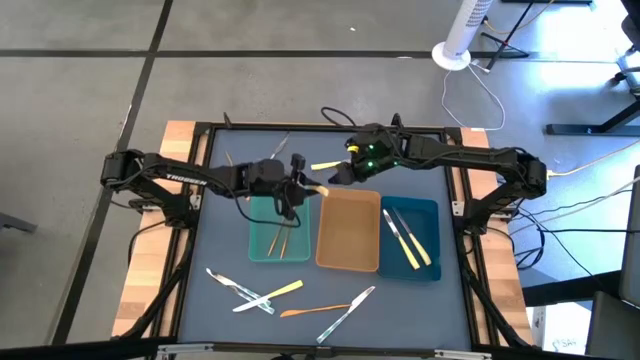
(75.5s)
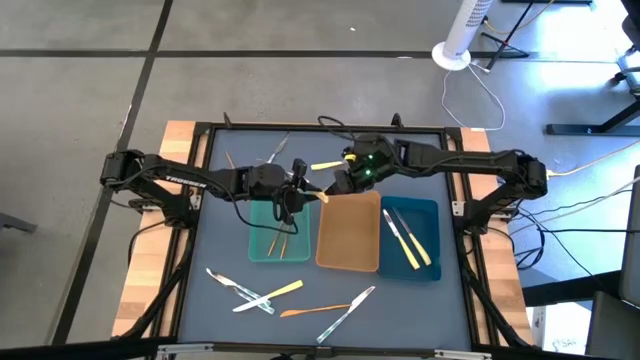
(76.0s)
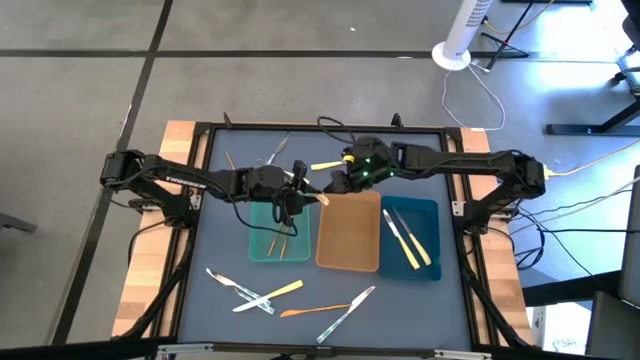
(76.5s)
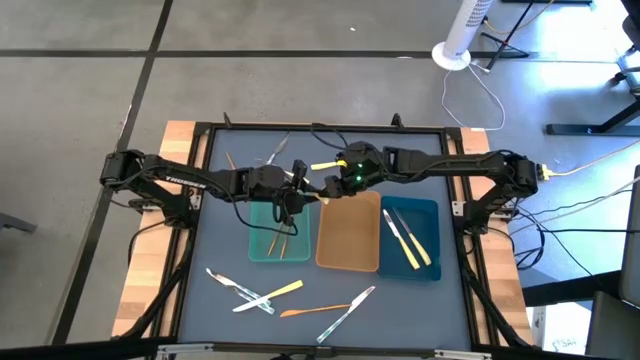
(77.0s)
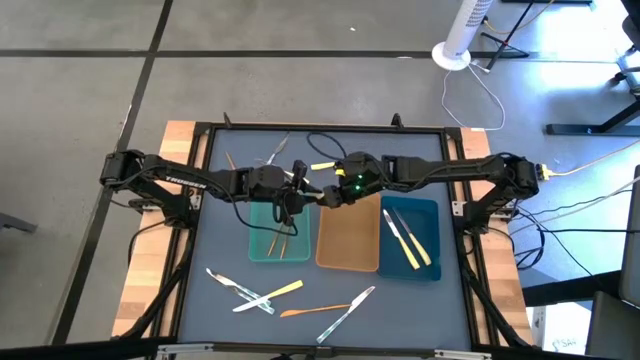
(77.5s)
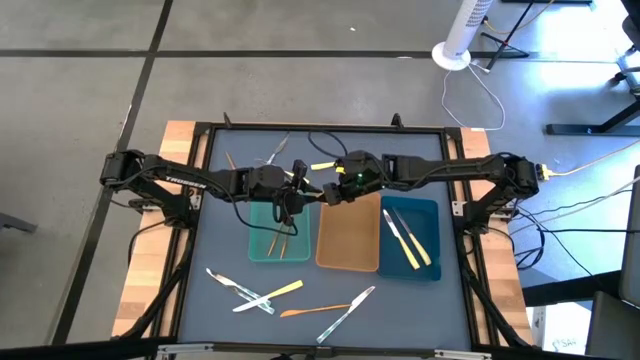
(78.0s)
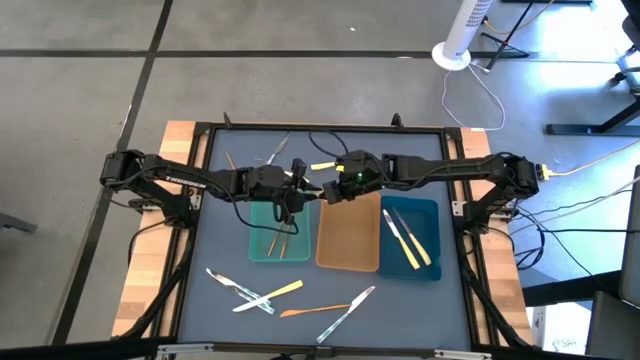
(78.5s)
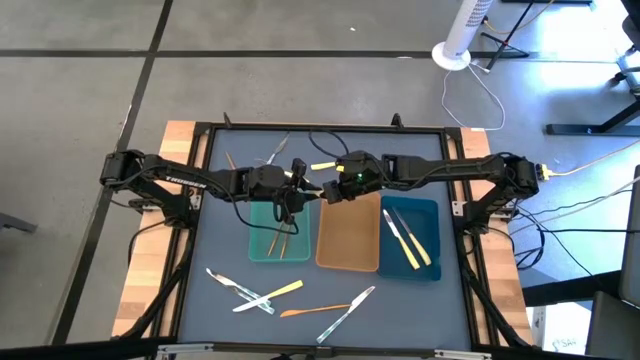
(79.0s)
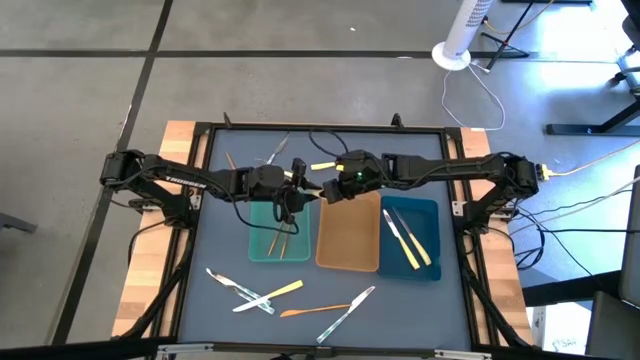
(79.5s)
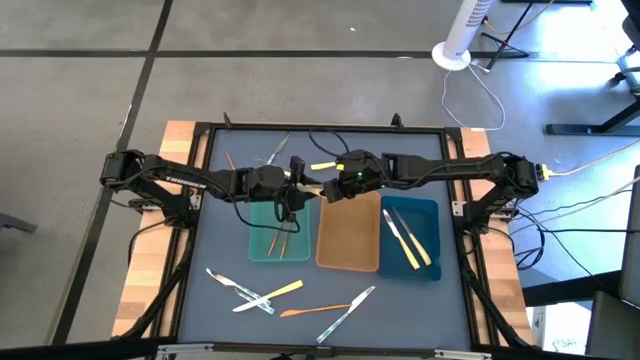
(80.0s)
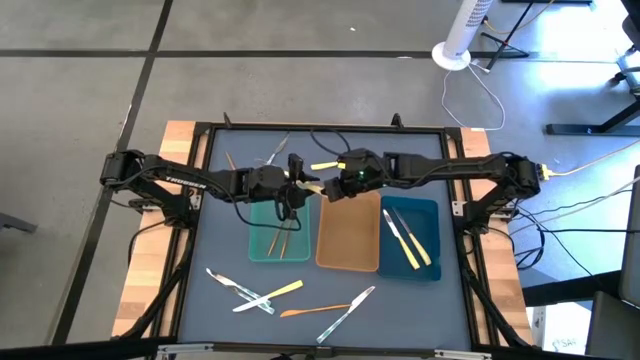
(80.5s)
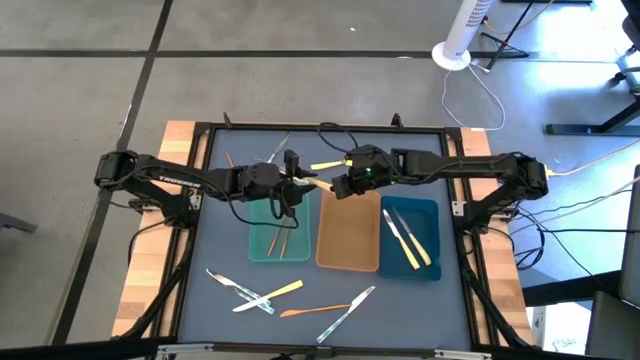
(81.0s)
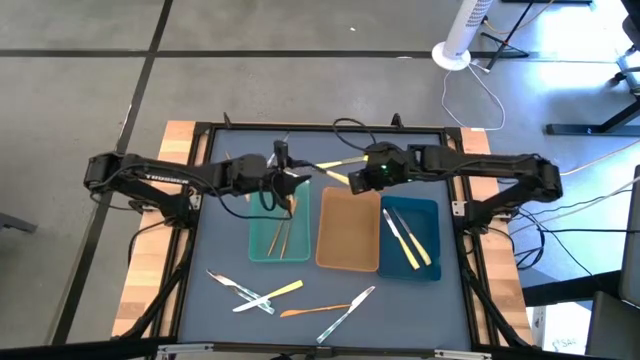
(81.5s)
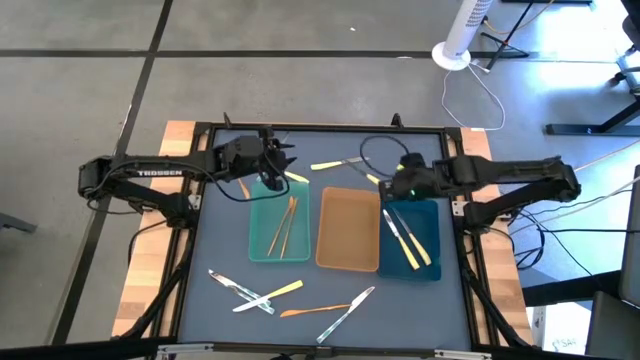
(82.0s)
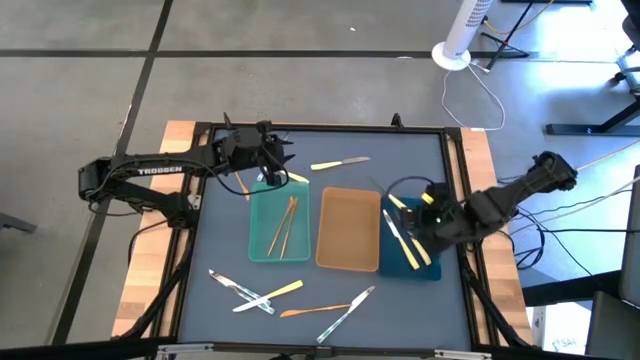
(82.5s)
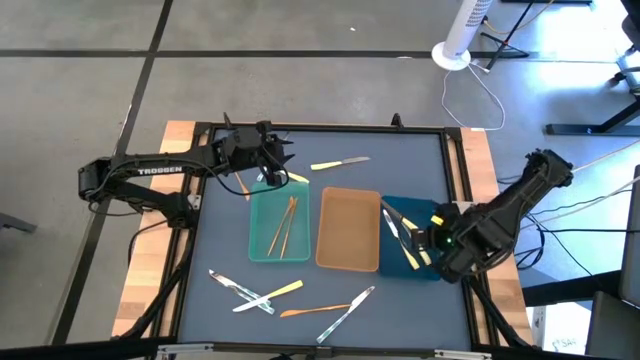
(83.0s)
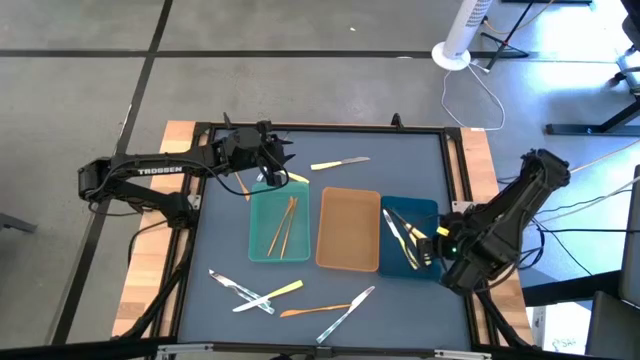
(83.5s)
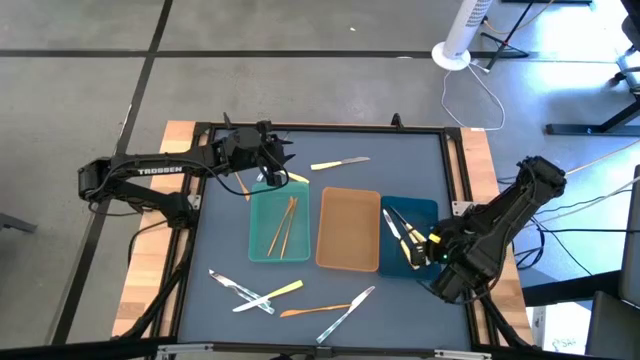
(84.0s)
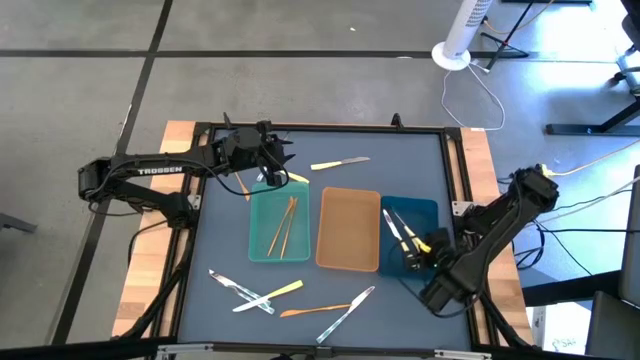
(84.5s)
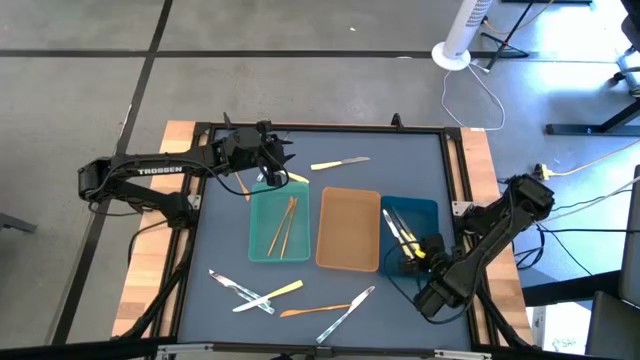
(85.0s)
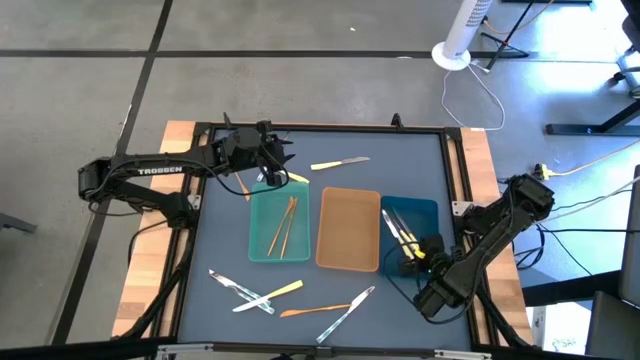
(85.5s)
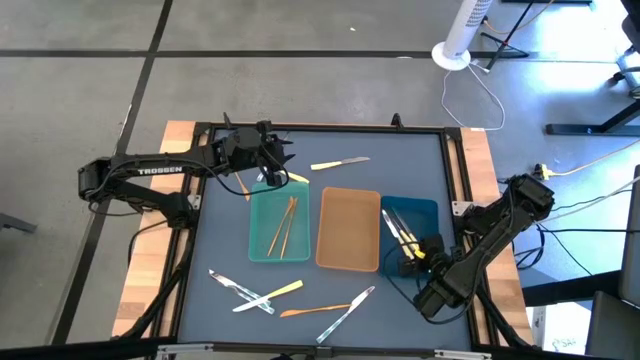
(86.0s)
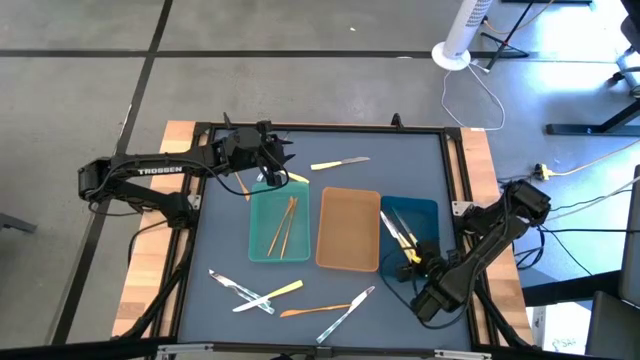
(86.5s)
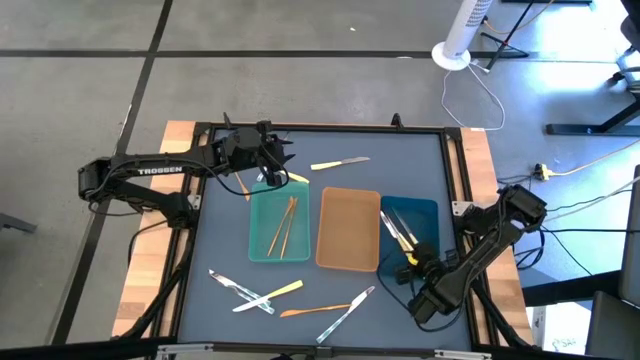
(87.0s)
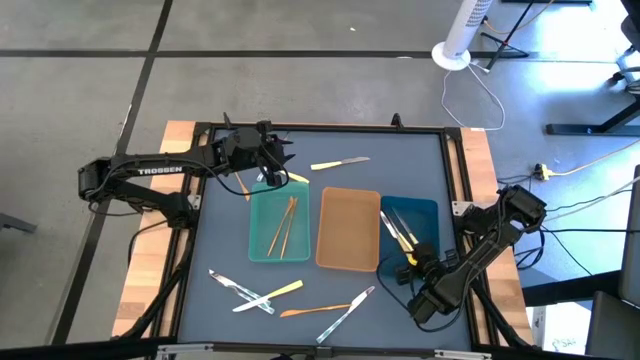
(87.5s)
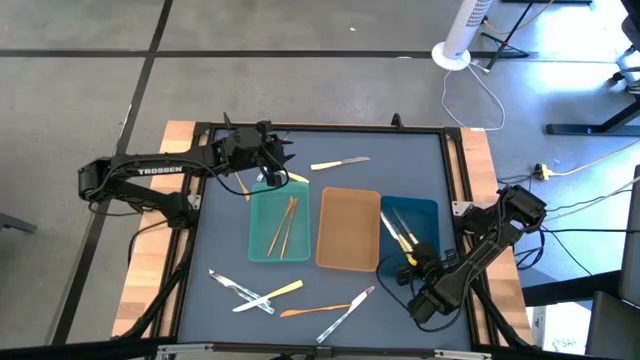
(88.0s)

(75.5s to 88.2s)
Task: Sort silverware by color (type)
Put the yellow knife into the blue bin

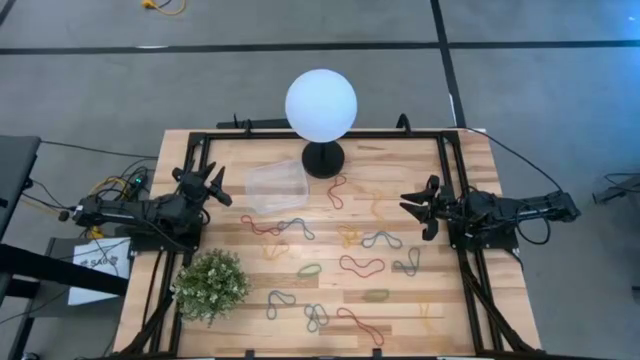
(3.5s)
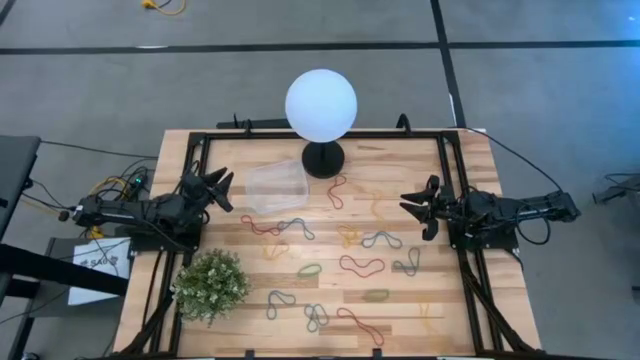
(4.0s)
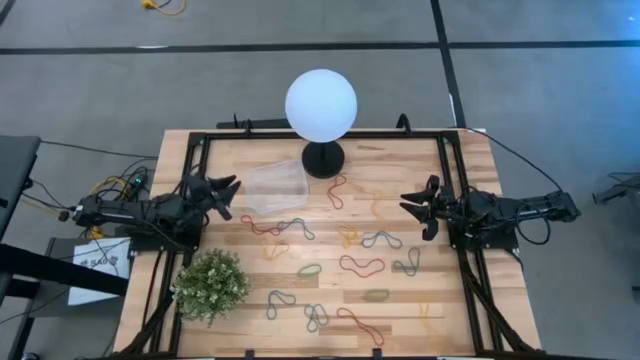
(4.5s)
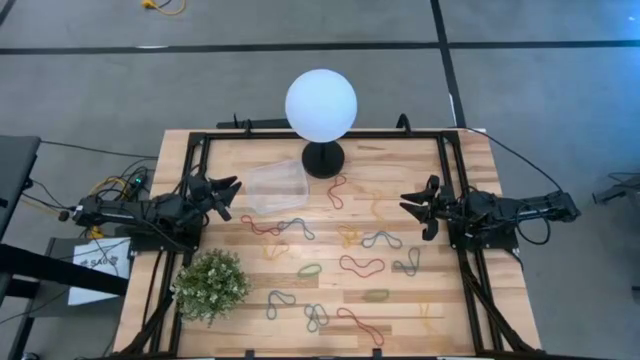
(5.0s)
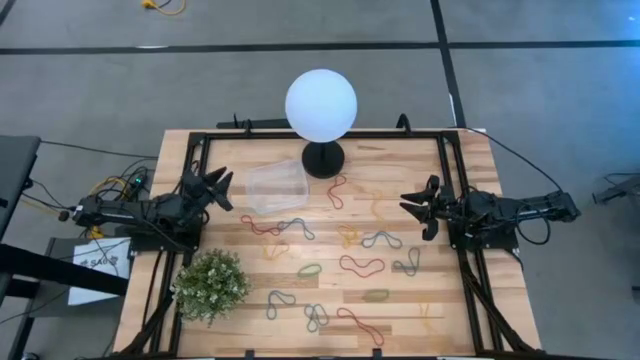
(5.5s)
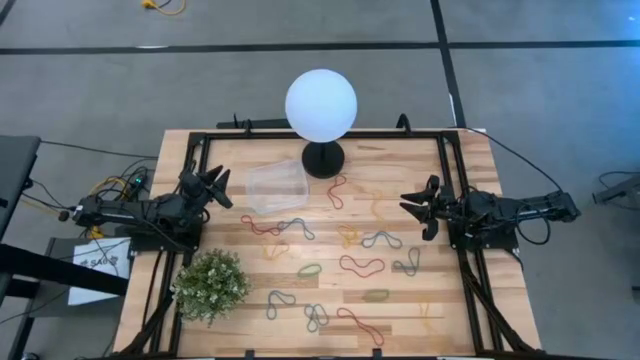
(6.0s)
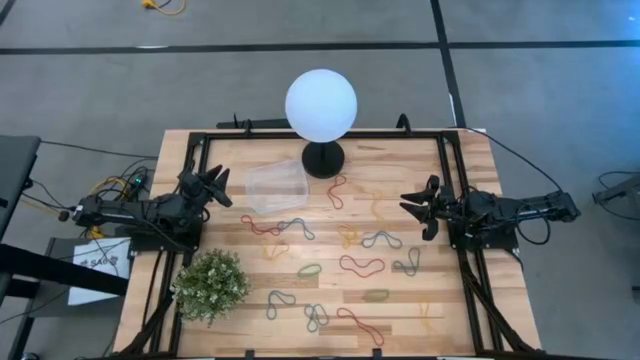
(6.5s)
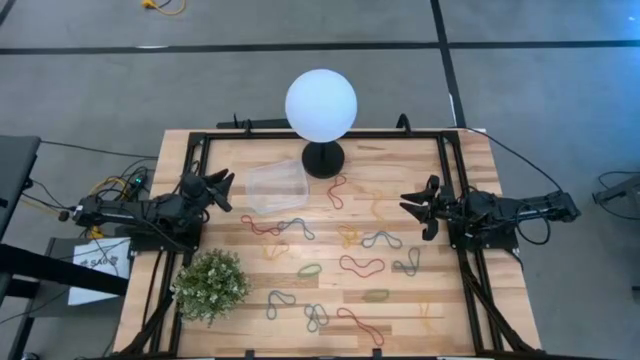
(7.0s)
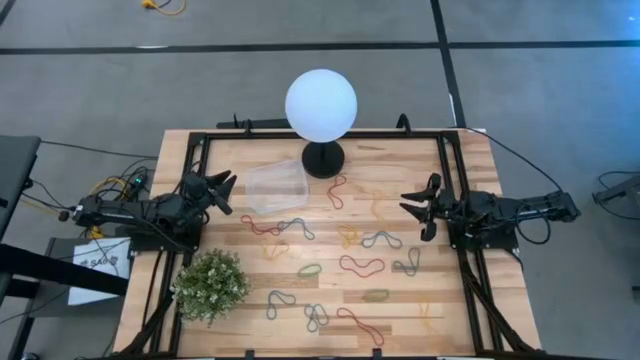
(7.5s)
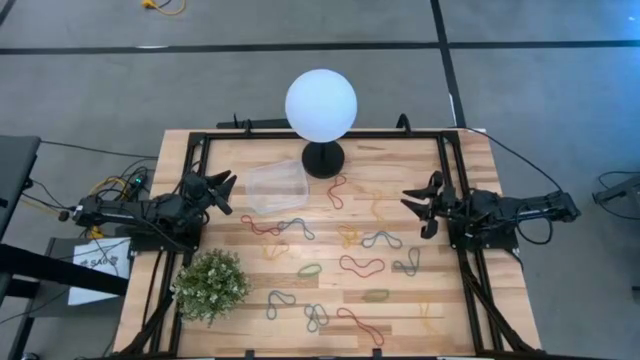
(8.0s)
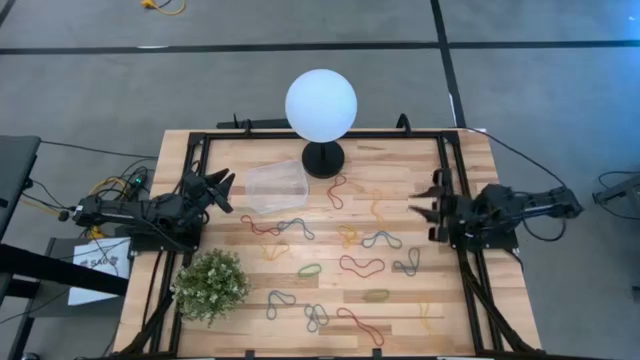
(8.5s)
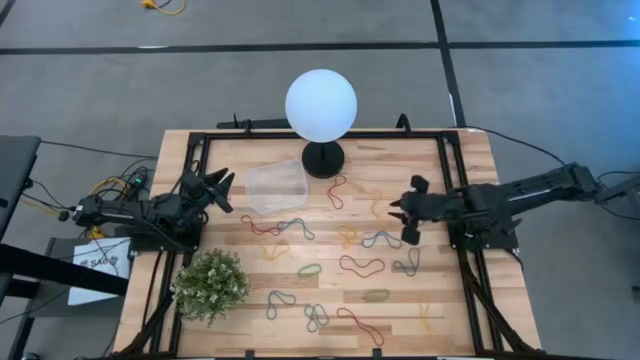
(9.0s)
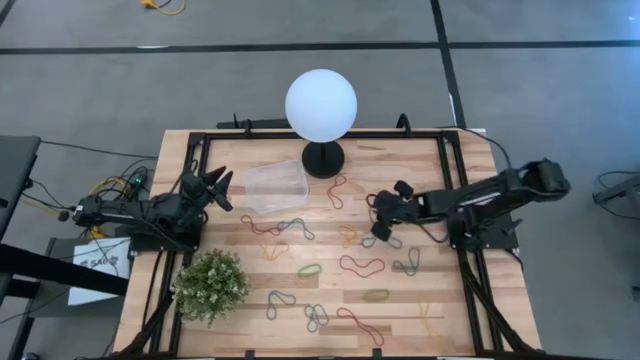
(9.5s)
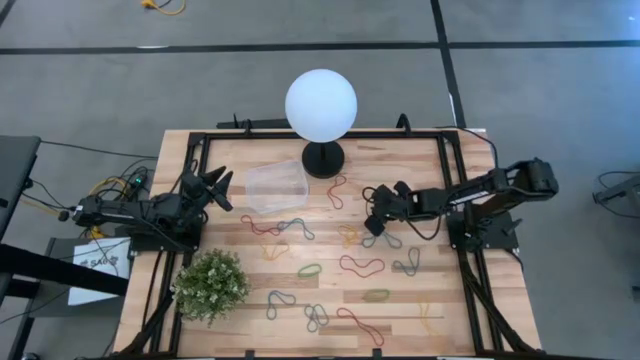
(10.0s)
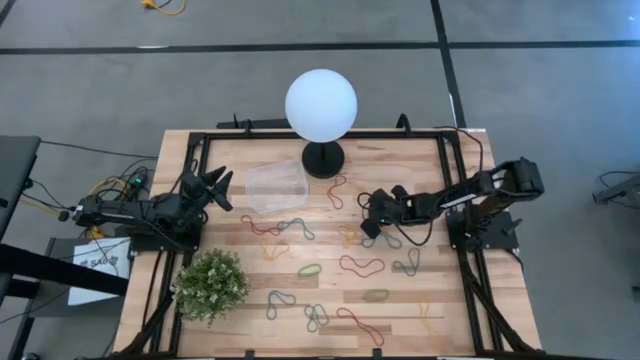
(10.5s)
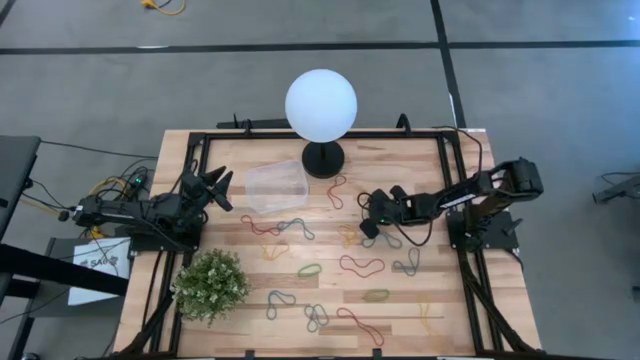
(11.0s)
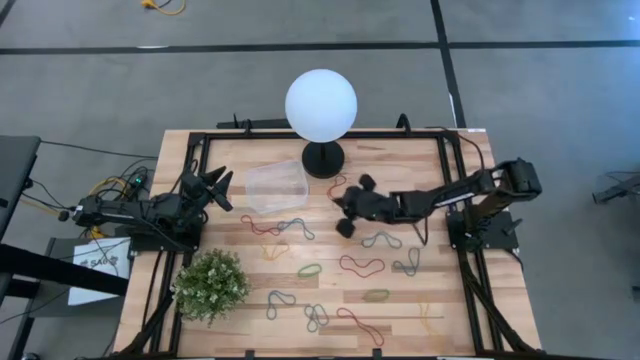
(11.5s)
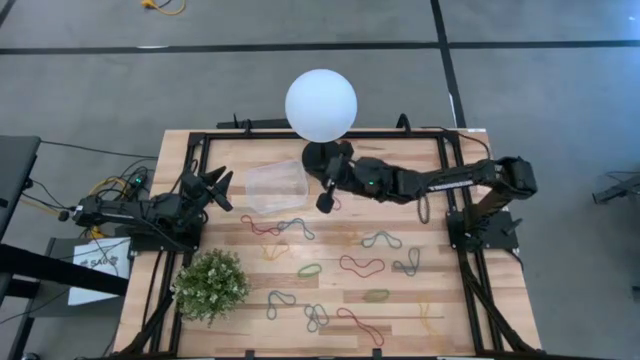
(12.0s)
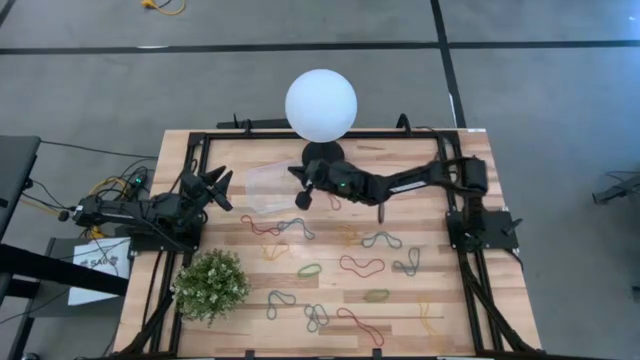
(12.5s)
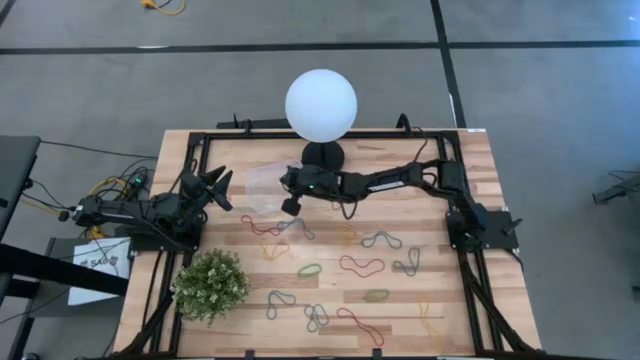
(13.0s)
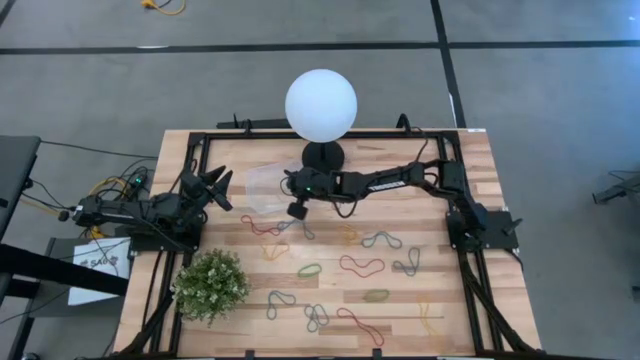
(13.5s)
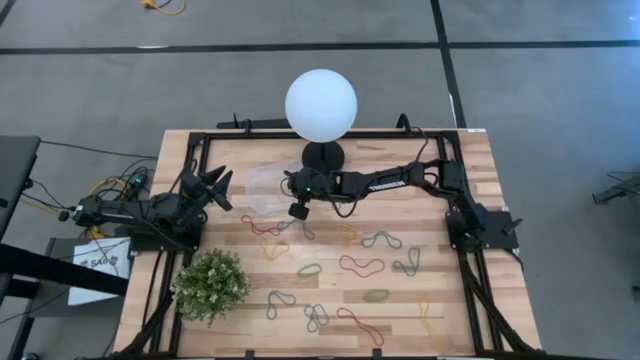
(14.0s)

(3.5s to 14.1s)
Task: Pick and place items into bin
Put the yellow rubber band into the transparent bin
